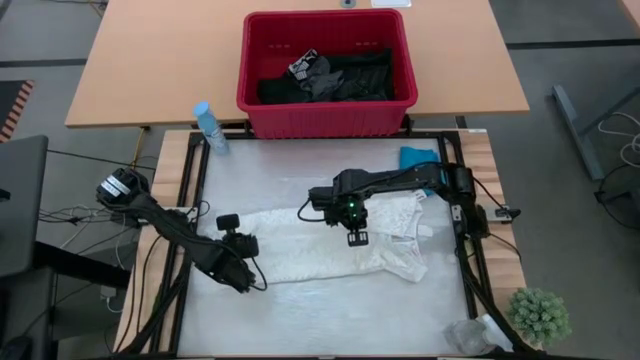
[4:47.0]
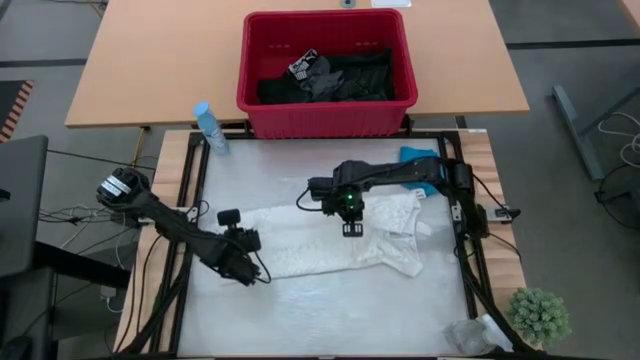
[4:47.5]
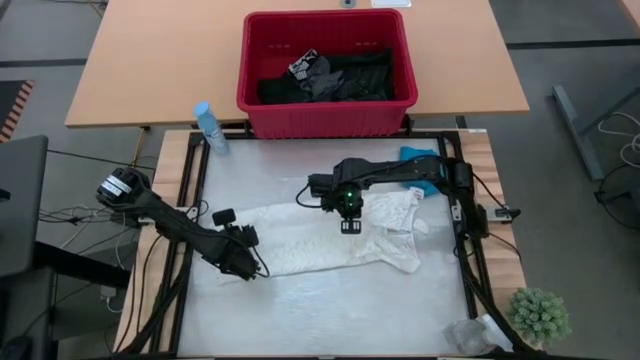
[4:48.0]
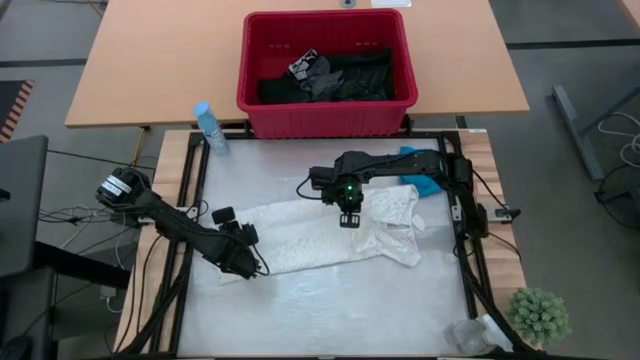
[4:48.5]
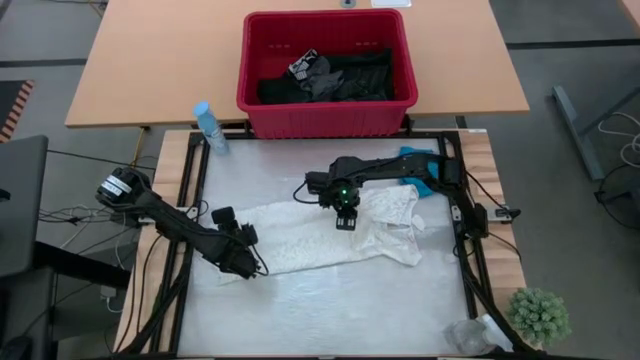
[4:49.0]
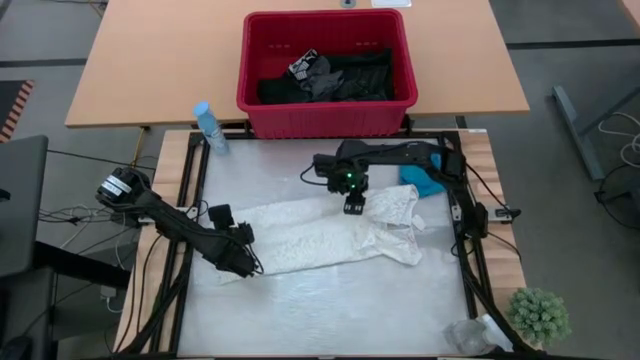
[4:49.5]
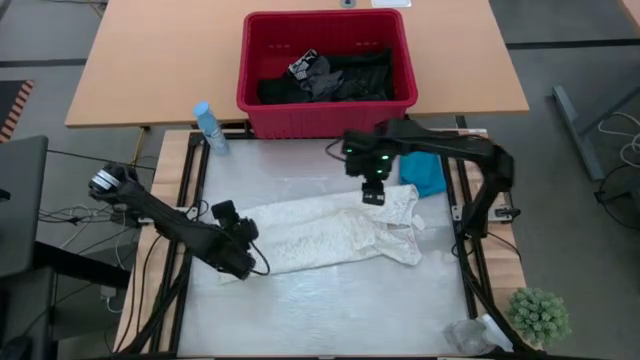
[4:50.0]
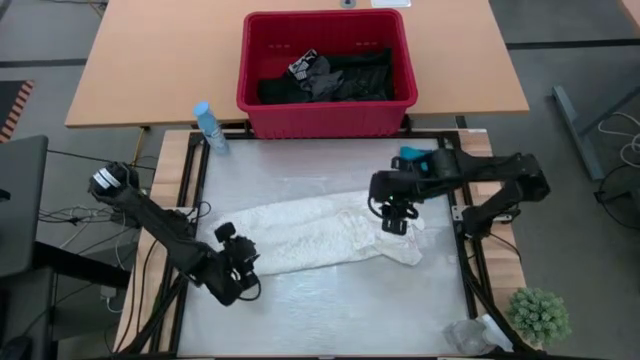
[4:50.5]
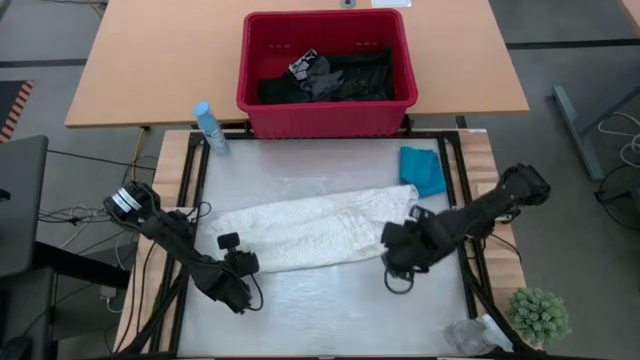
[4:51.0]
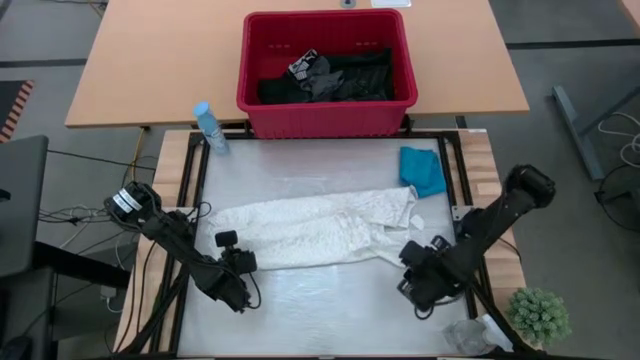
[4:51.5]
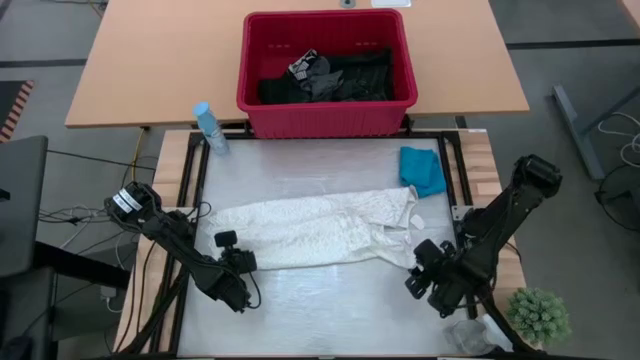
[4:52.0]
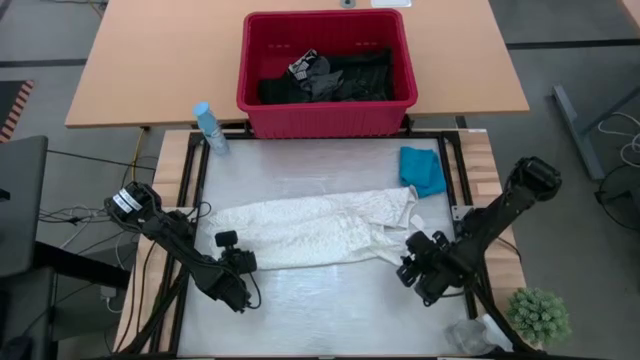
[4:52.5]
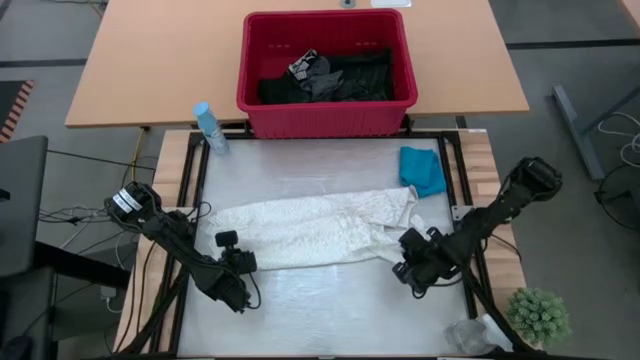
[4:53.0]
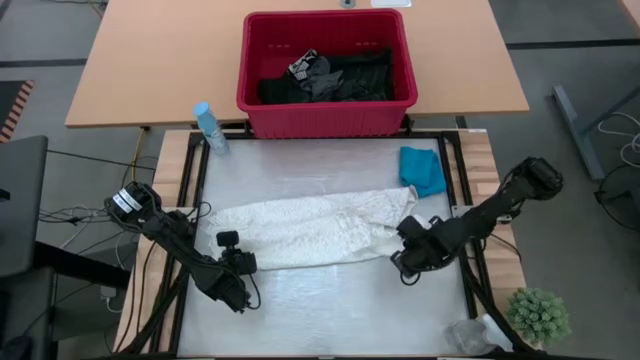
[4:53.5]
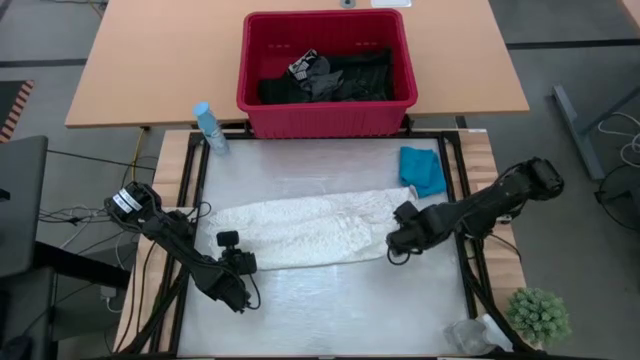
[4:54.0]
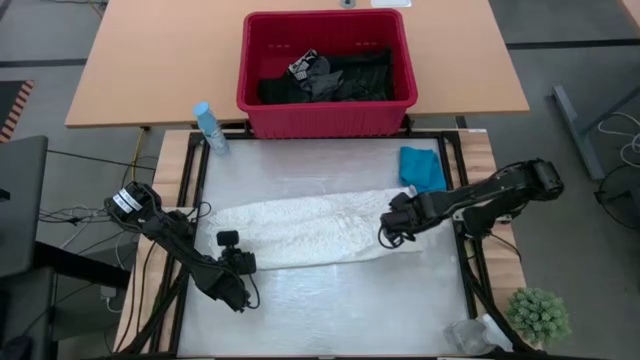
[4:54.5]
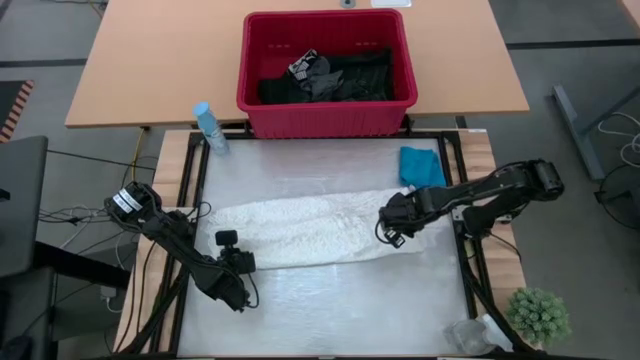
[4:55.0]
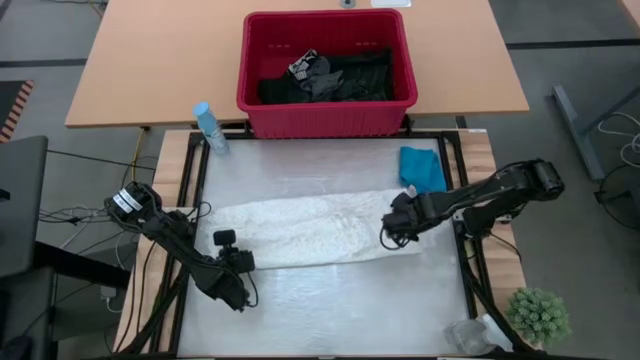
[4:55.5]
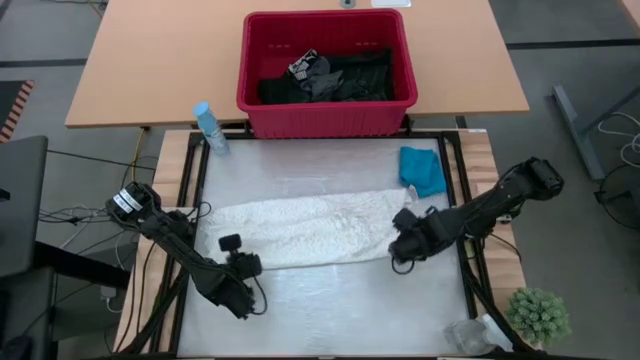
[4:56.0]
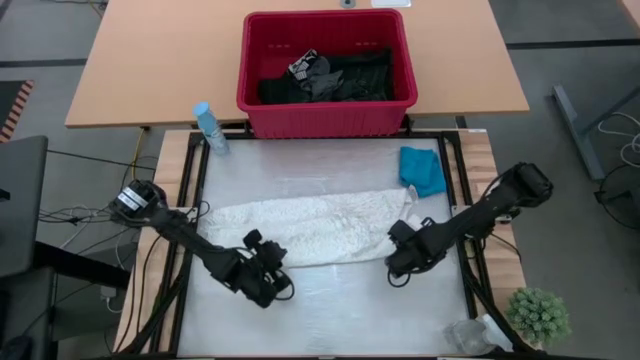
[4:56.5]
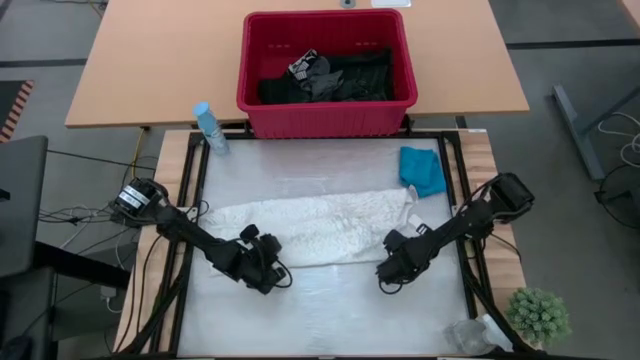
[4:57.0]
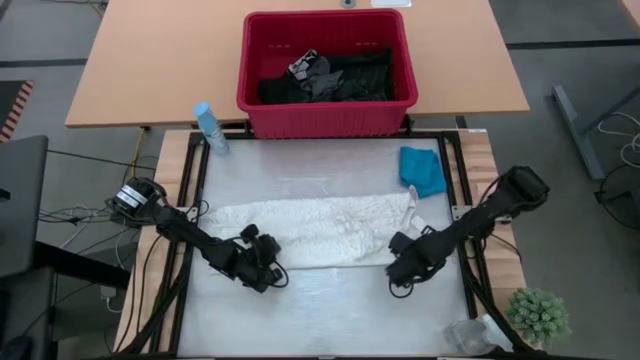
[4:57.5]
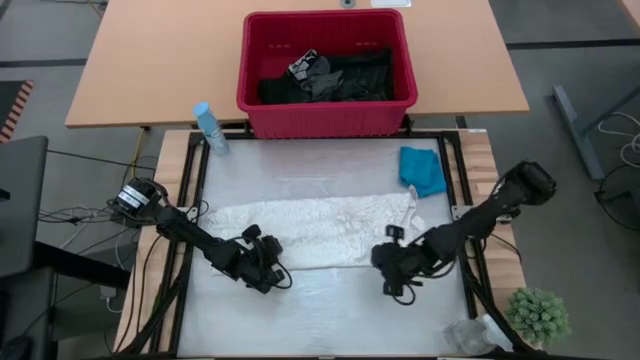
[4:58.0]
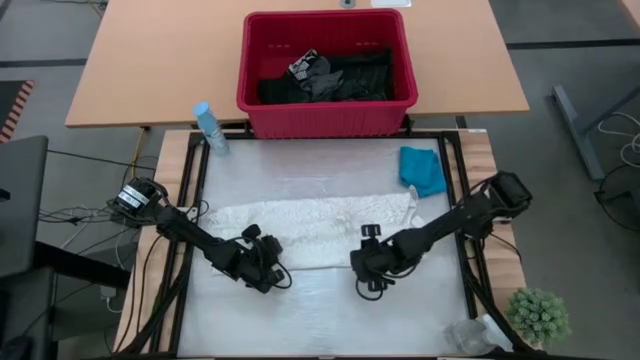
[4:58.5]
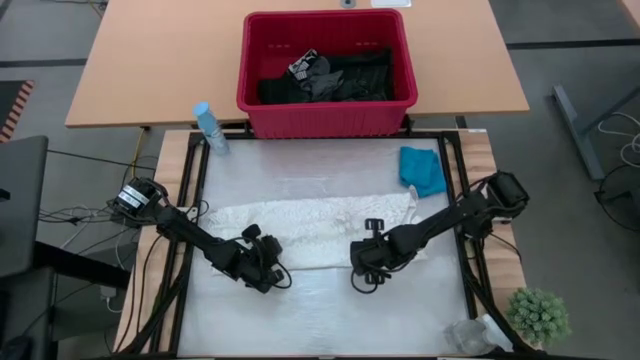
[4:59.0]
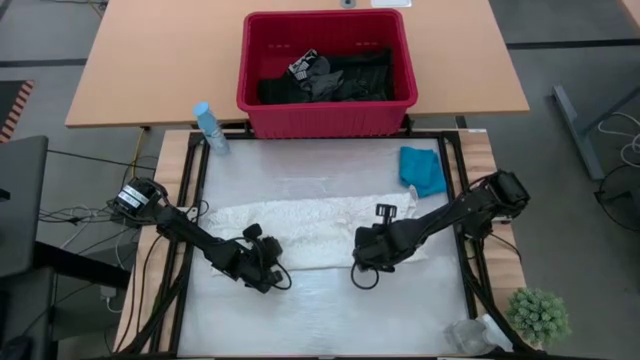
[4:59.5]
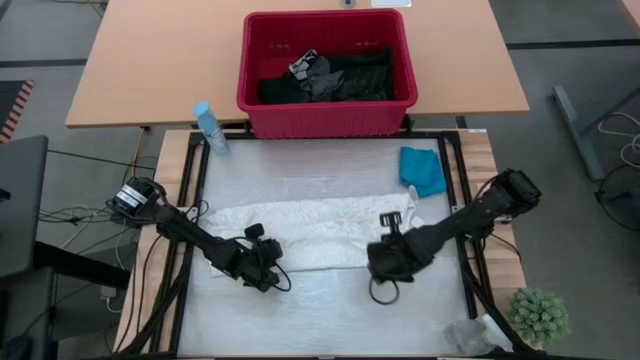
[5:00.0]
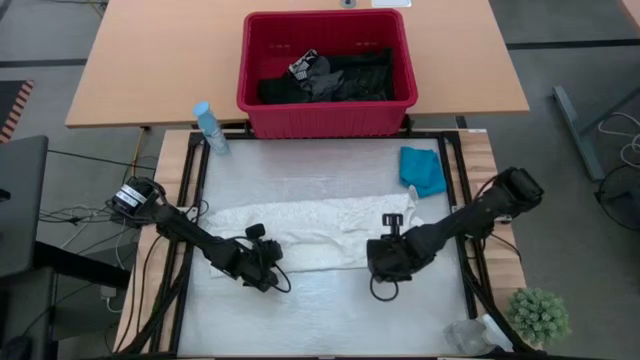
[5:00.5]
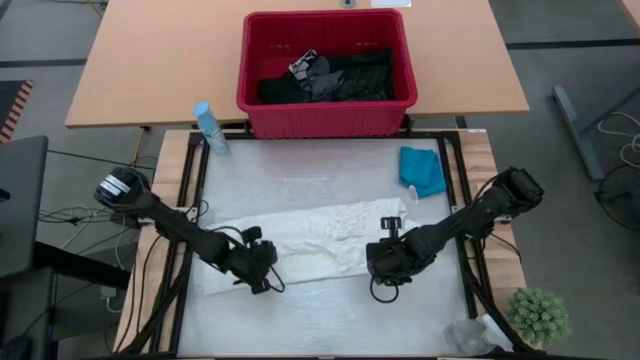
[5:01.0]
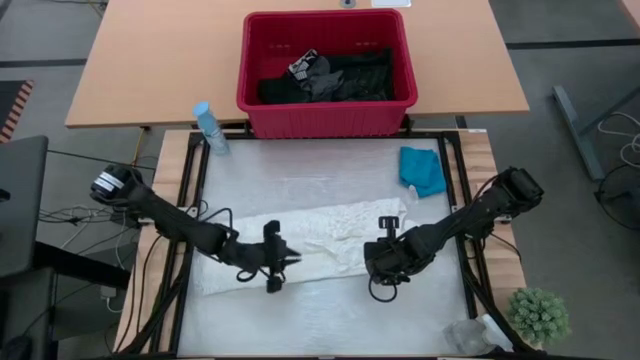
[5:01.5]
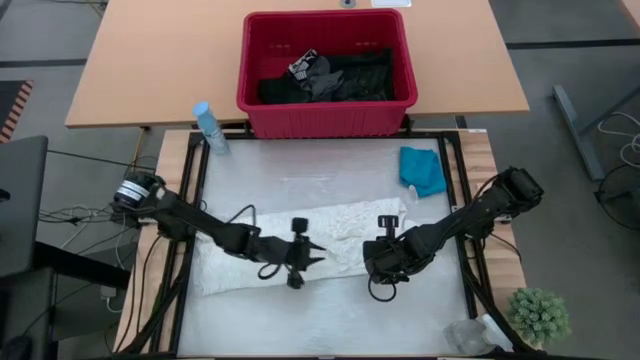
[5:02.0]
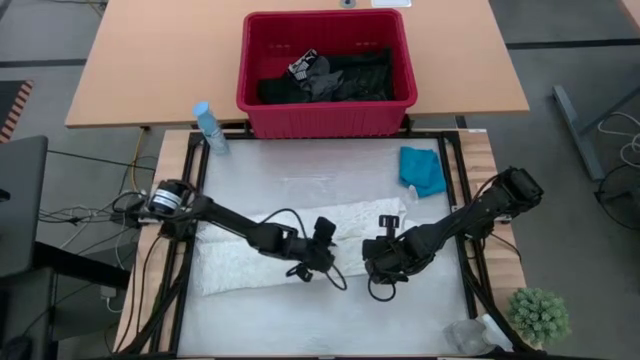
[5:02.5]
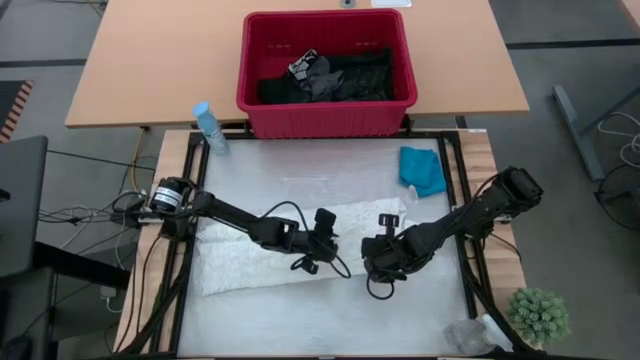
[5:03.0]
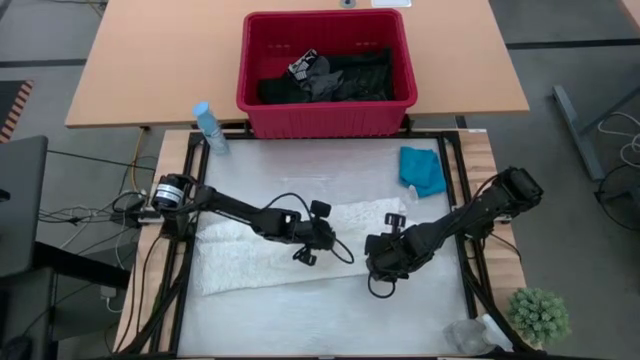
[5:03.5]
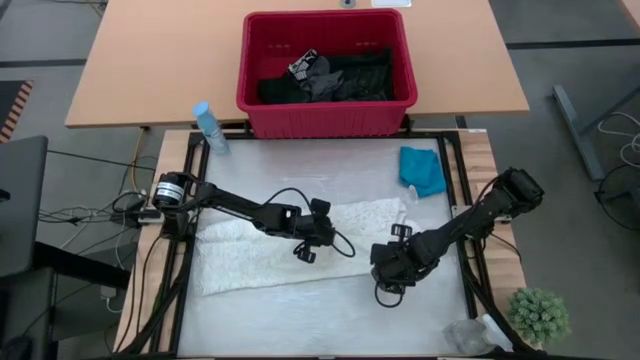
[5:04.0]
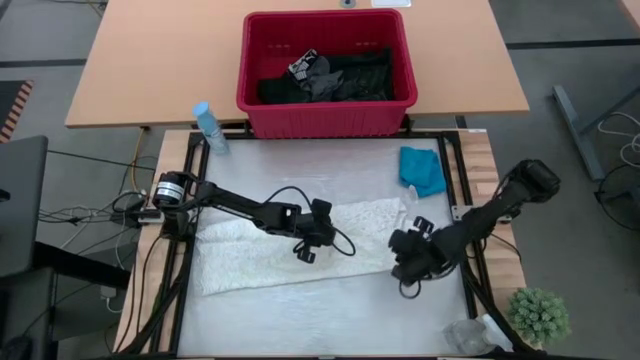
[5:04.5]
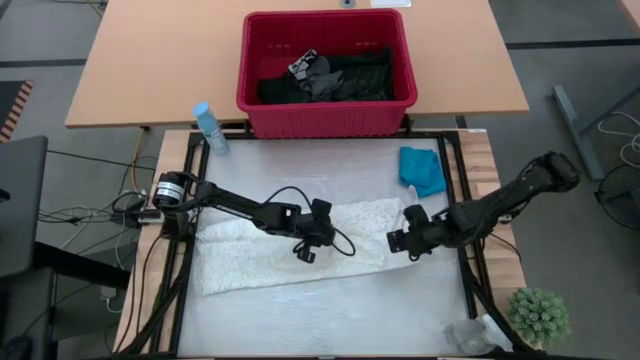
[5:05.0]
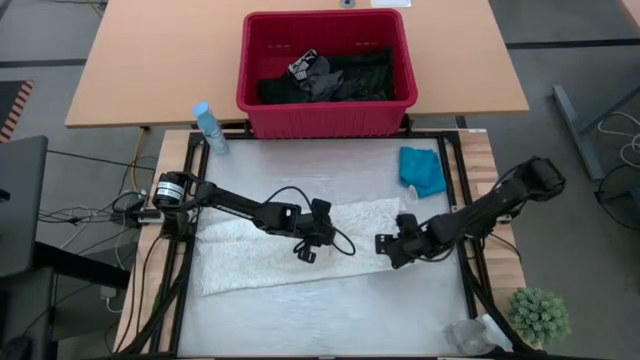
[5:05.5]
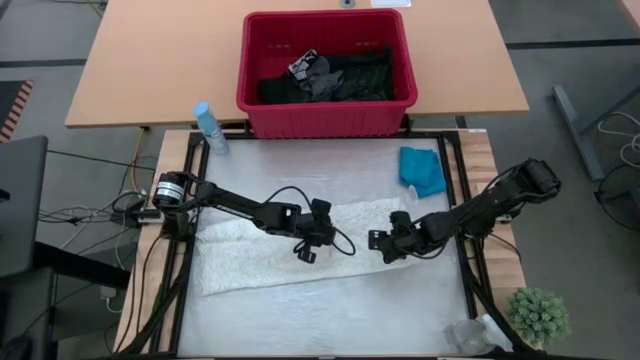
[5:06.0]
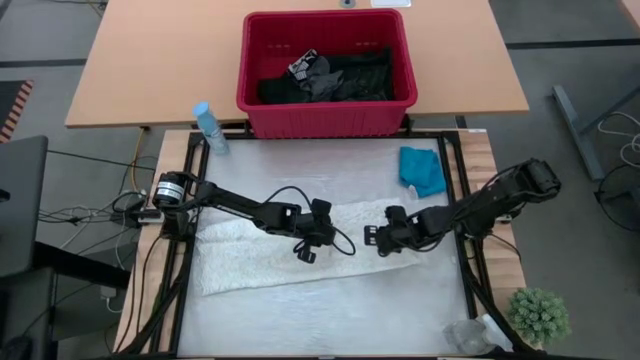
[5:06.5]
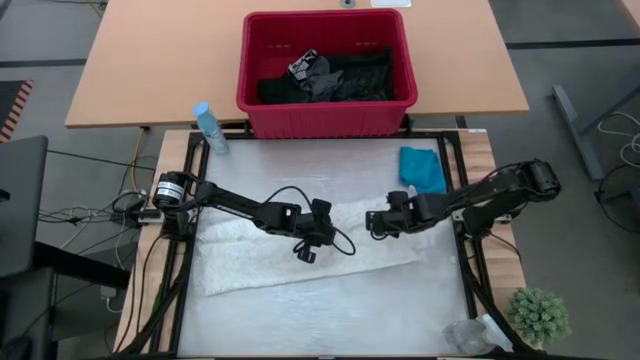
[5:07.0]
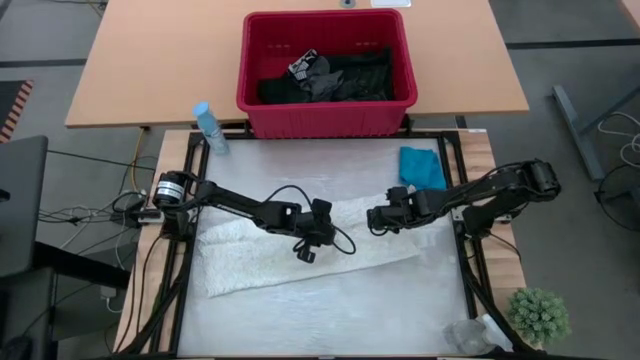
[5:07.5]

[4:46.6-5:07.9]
Task: Fold laundry
Fold the white shirt

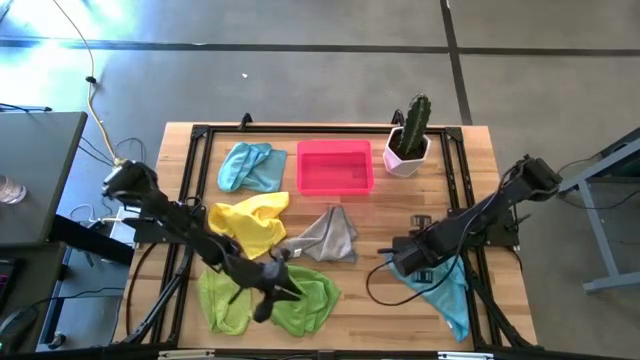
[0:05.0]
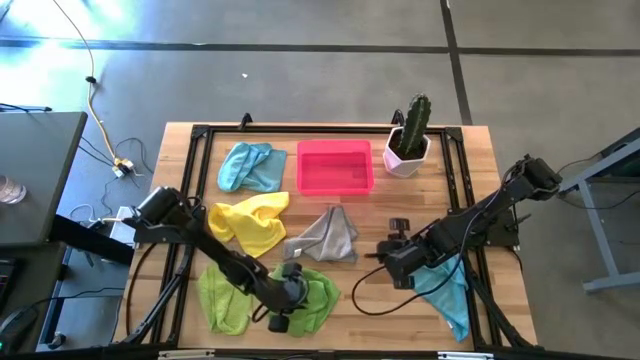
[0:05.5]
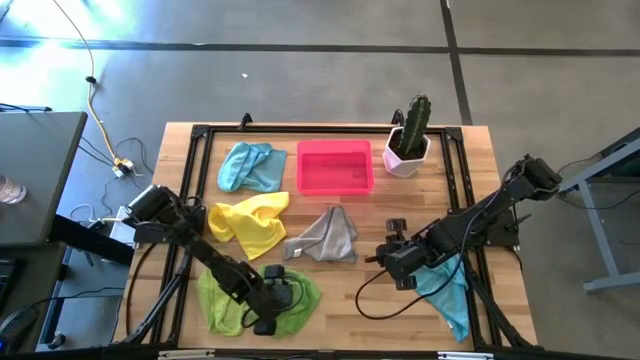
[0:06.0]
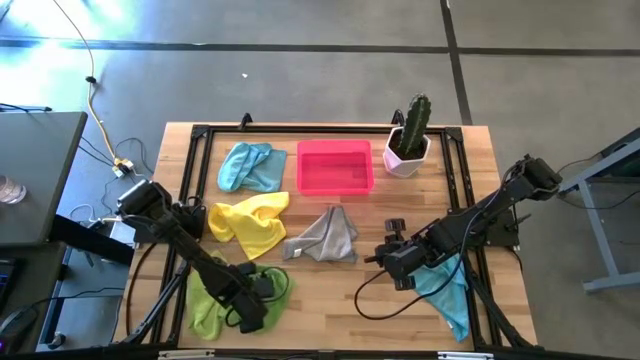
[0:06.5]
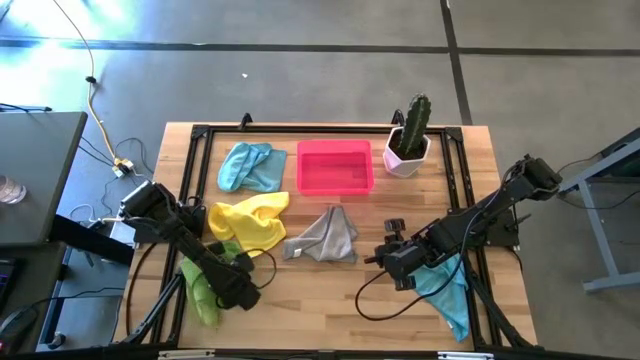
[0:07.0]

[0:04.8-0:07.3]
Task: Fold microfiber towels
Adjust the green microfiber cloth
